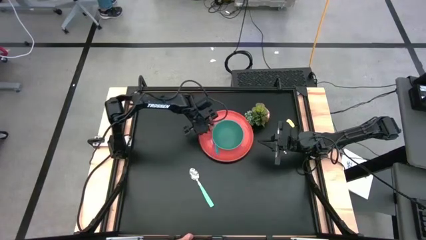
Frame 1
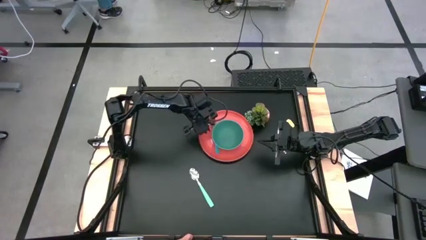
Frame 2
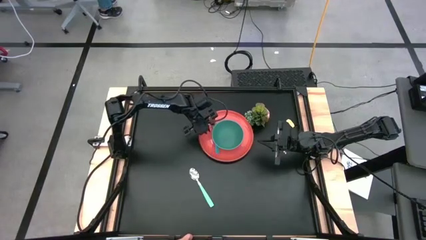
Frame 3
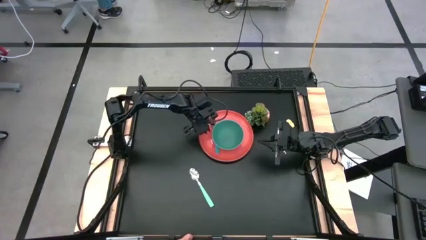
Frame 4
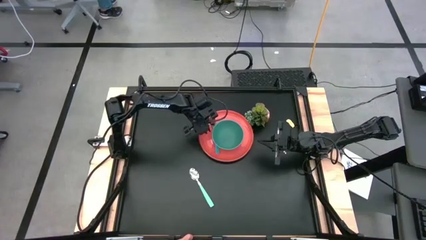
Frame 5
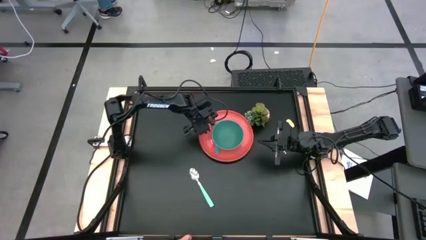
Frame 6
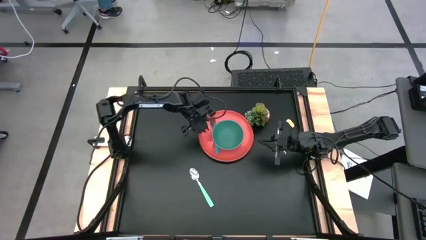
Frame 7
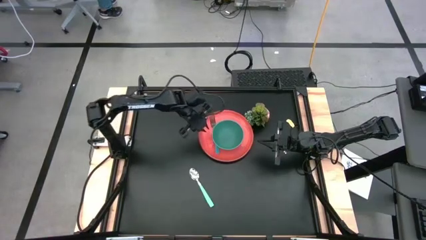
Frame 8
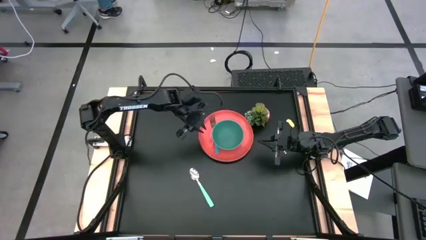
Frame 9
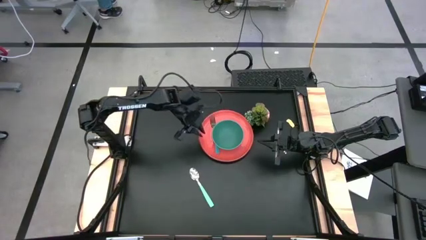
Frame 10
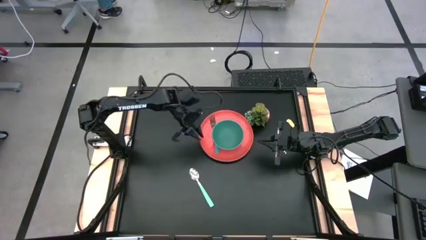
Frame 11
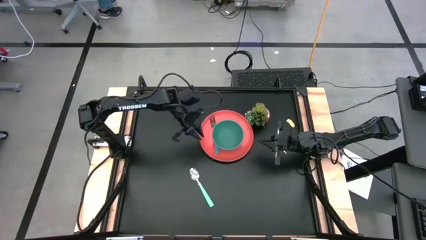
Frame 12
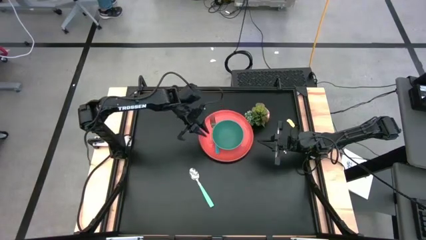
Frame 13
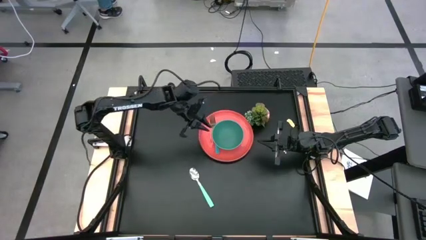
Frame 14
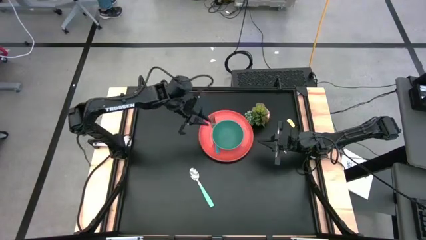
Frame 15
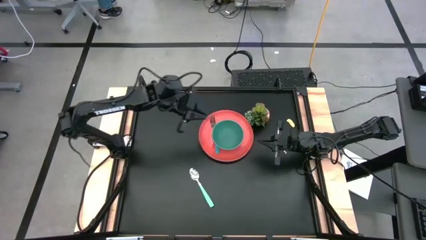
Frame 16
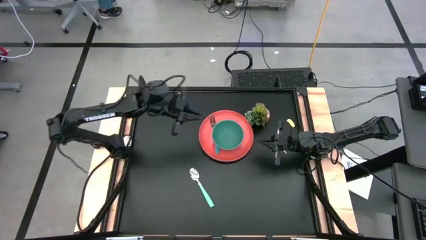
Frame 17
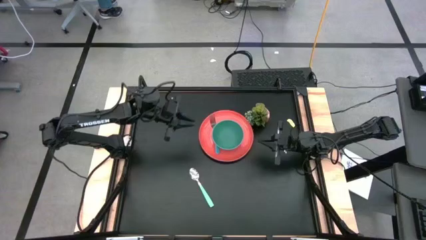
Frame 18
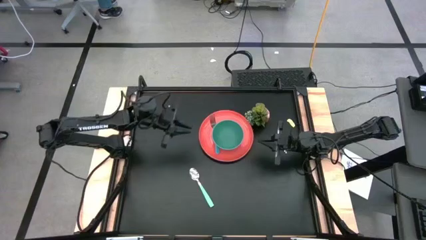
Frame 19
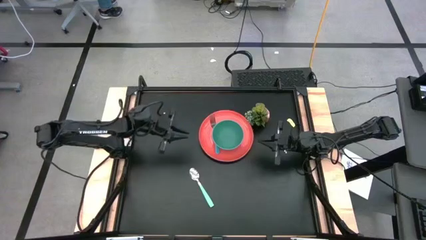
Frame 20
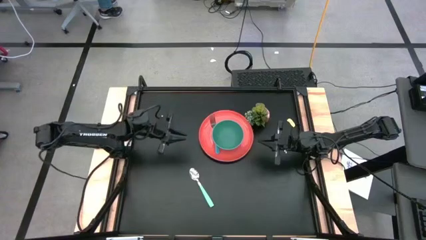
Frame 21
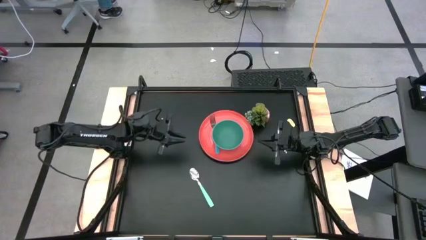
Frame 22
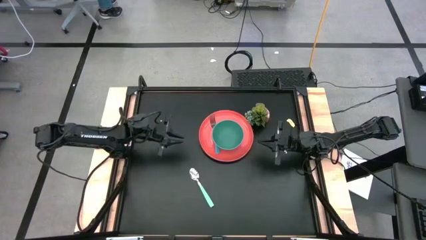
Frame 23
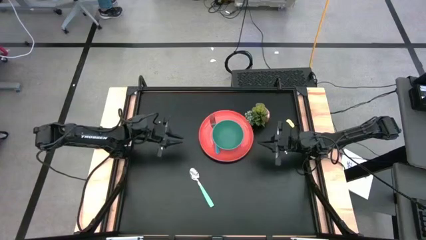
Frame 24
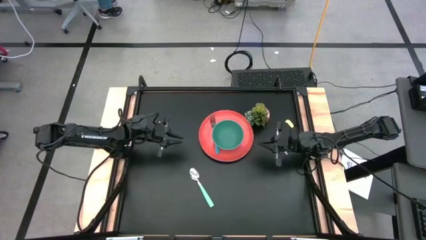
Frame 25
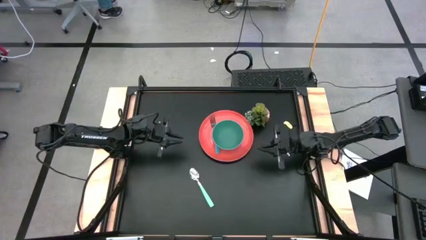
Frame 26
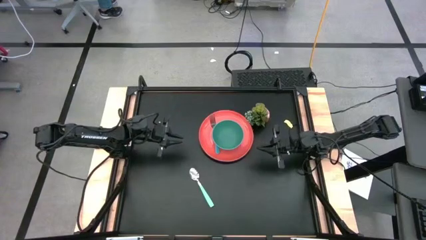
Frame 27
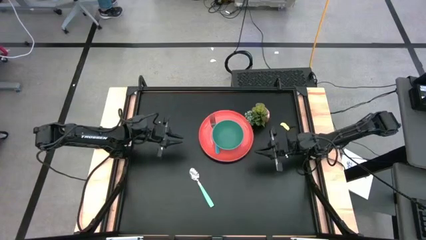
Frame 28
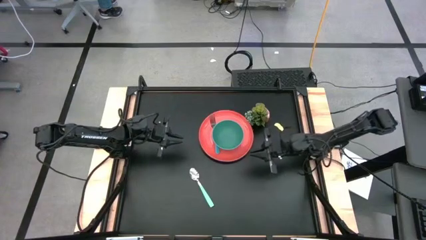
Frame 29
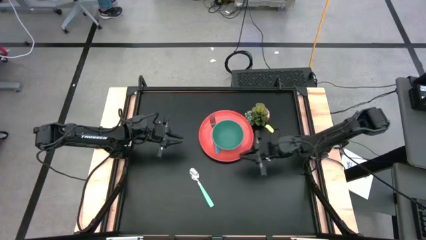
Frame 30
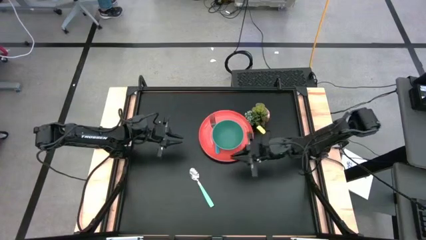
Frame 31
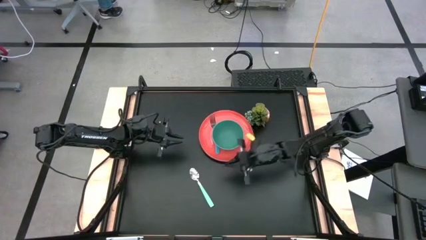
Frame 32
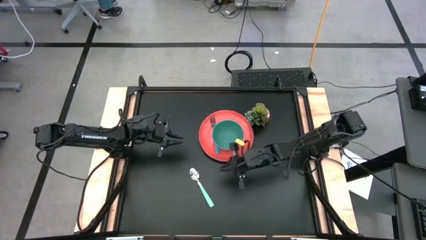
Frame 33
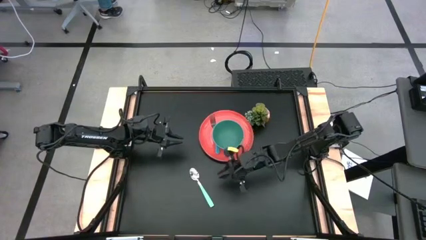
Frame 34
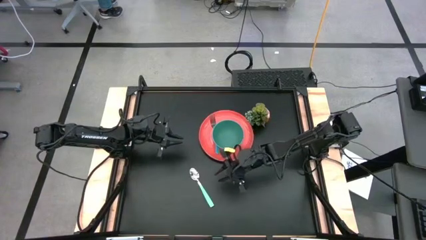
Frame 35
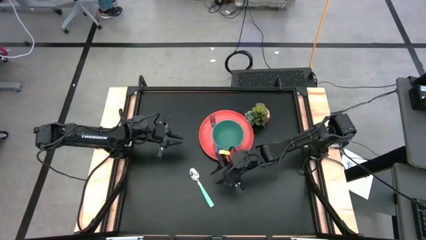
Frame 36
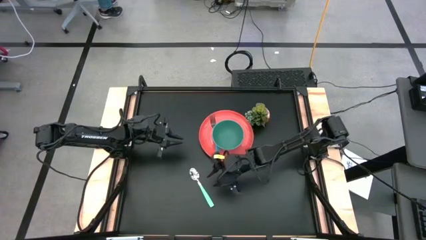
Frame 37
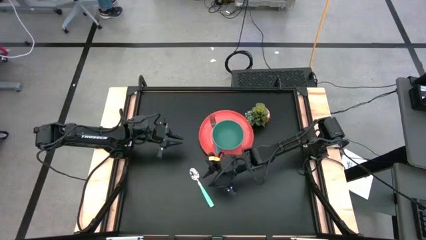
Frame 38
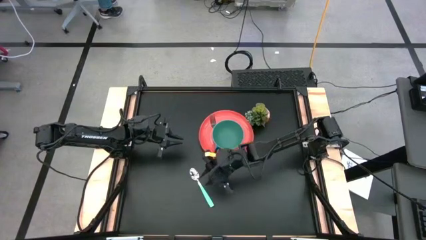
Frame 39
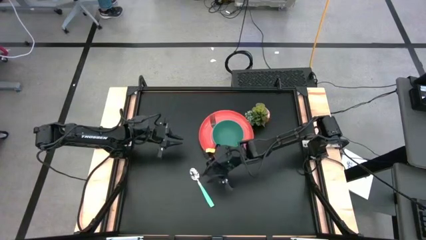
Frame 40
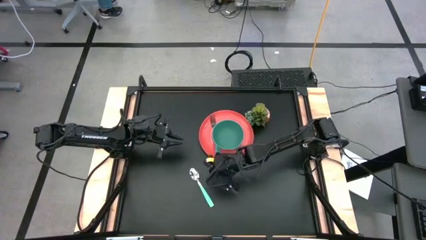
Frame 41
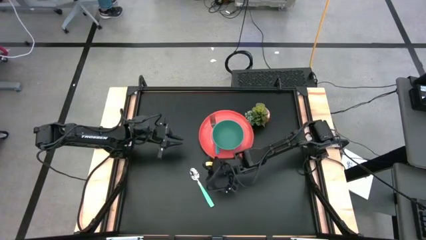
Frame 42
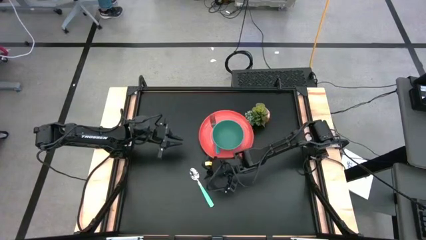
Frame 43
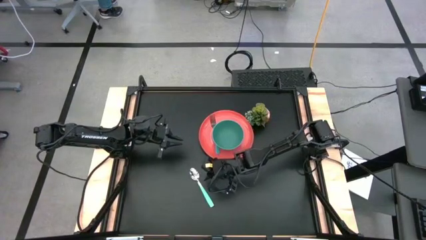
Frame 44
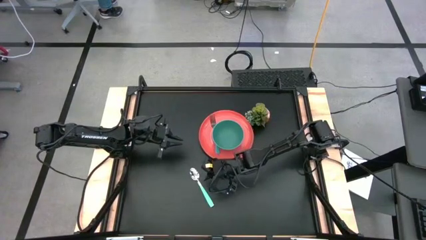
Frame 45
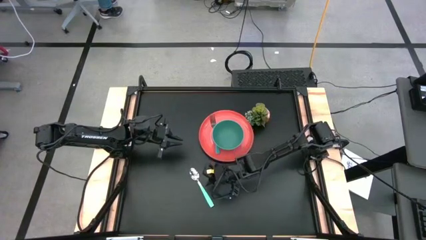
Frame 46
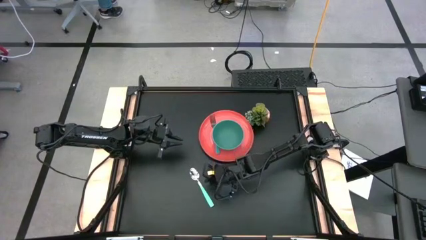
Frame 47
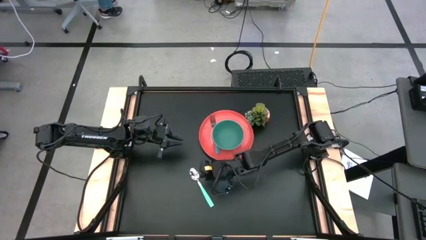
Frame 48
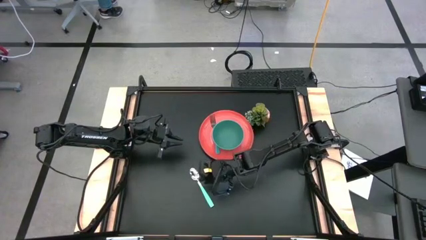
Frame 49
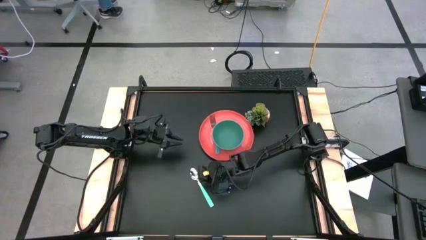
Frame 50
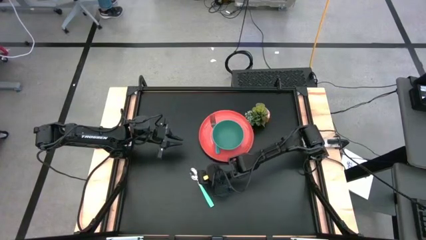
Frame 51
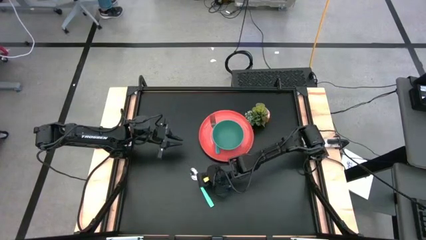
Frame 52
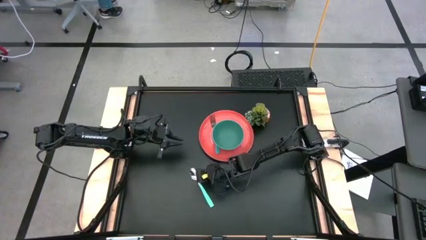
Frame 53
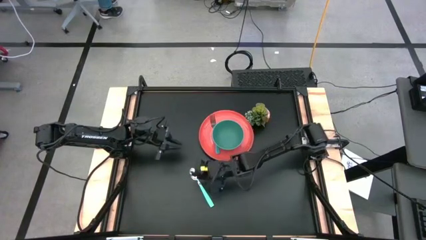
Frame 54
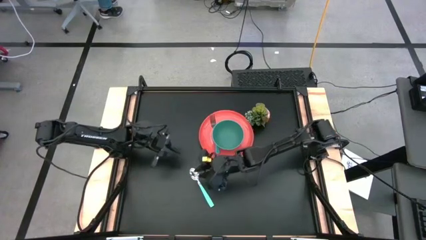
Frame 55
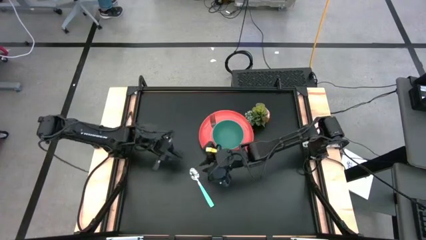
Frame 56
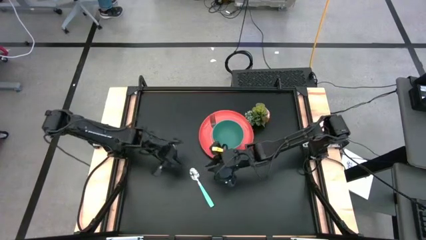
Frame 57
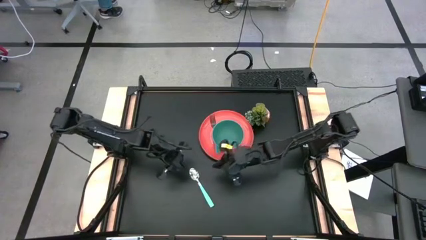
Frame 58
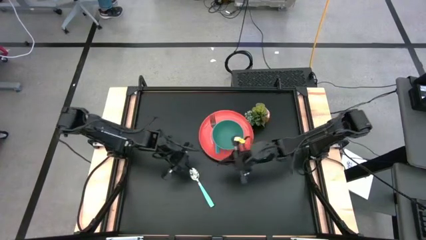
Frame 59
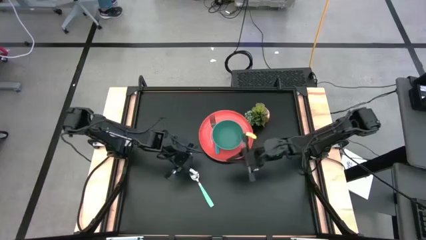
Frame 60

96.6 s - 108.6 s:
Task: Set table place
Put the blue spoon into the green bowl

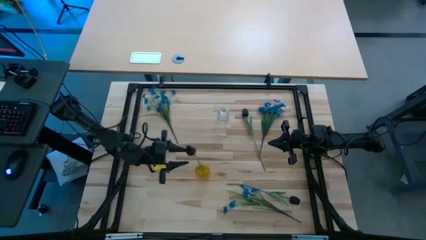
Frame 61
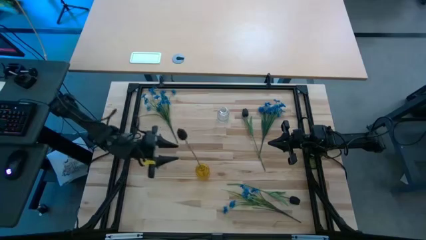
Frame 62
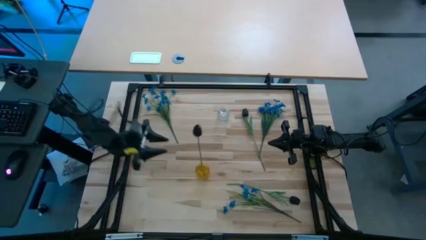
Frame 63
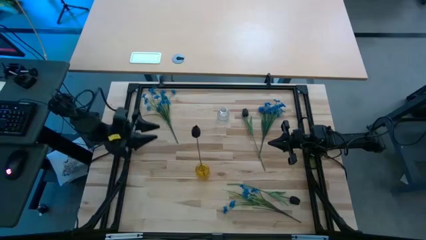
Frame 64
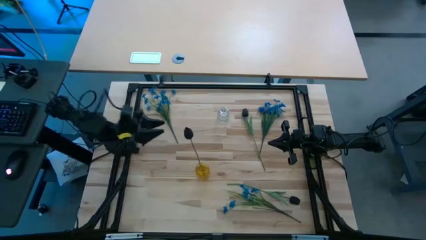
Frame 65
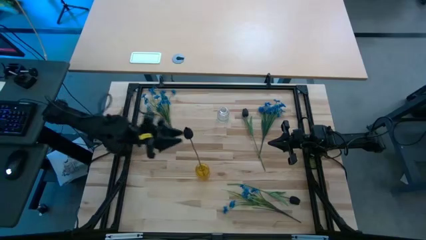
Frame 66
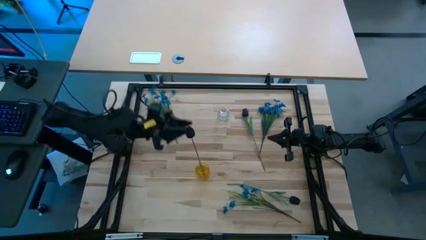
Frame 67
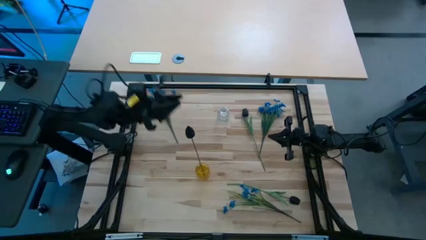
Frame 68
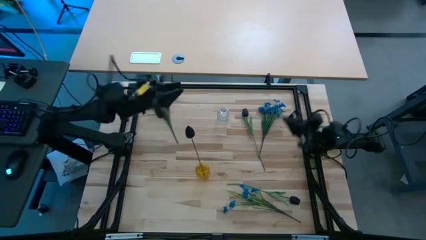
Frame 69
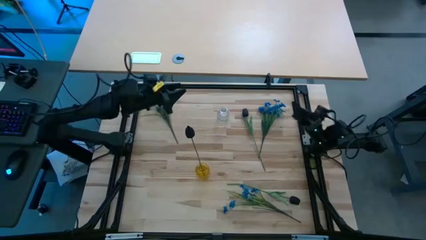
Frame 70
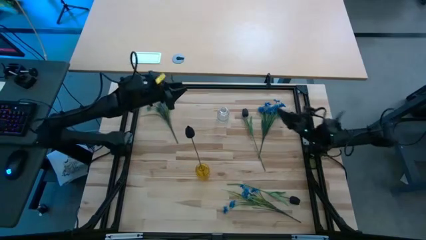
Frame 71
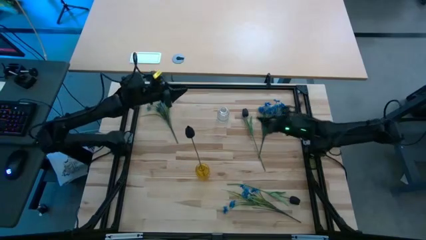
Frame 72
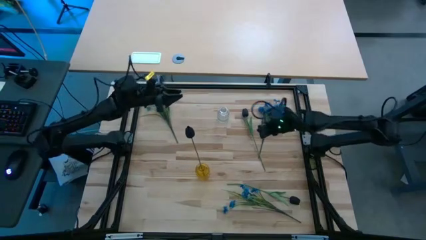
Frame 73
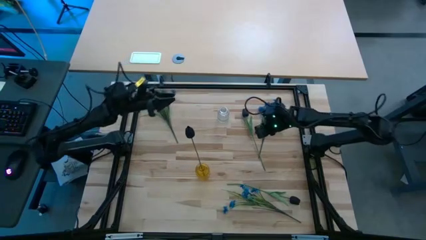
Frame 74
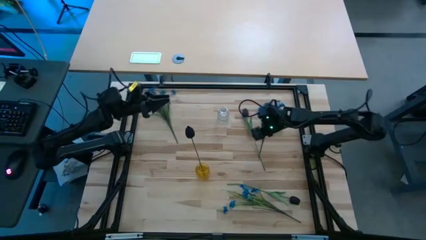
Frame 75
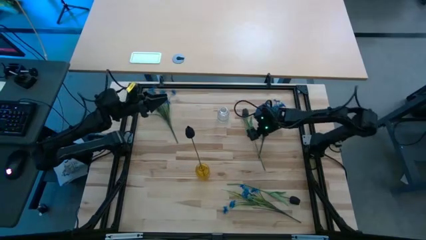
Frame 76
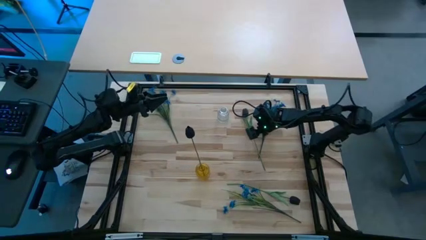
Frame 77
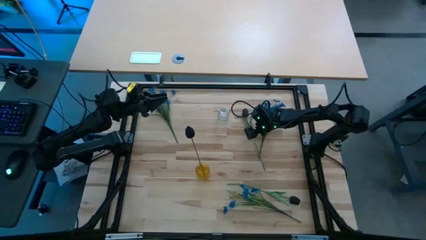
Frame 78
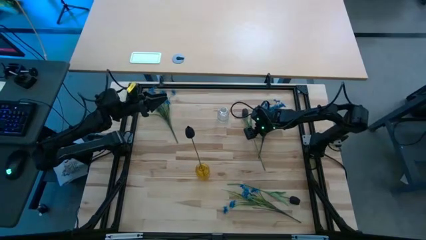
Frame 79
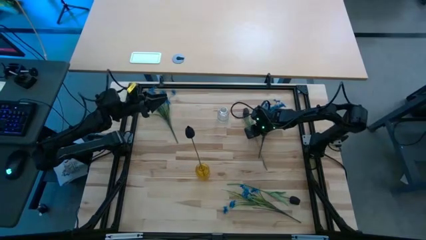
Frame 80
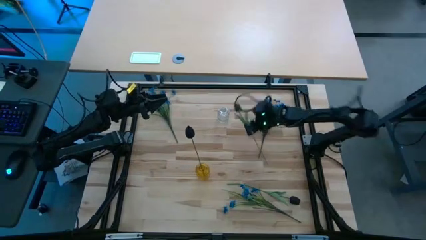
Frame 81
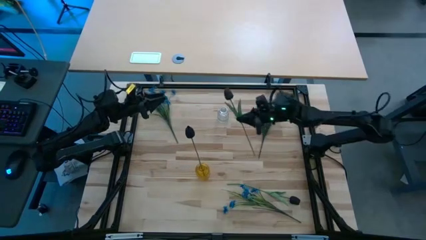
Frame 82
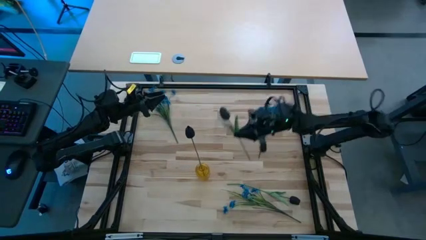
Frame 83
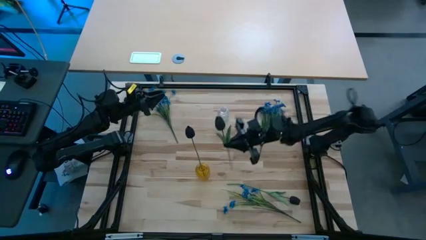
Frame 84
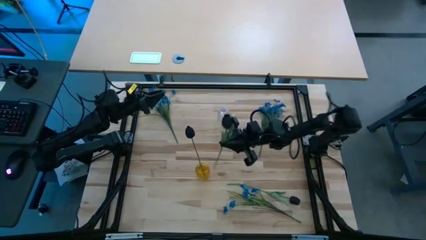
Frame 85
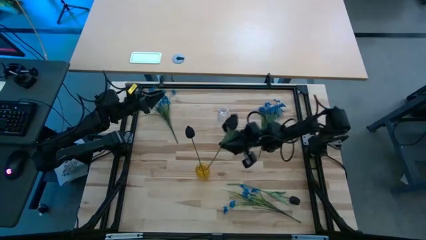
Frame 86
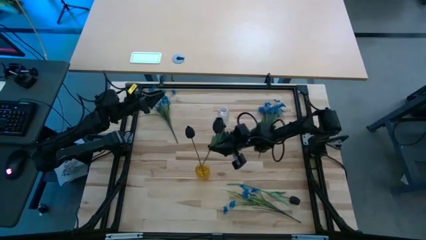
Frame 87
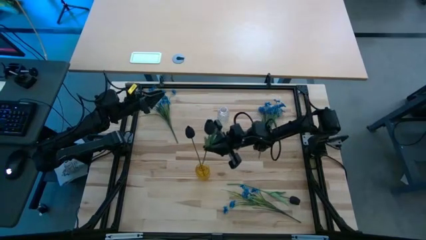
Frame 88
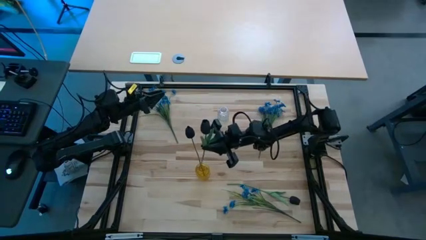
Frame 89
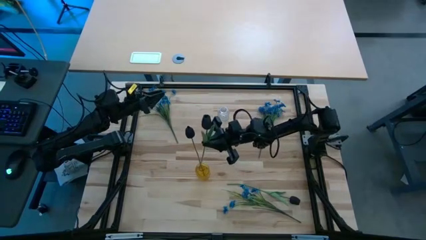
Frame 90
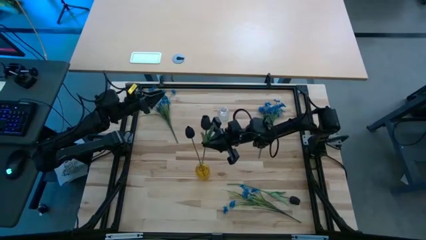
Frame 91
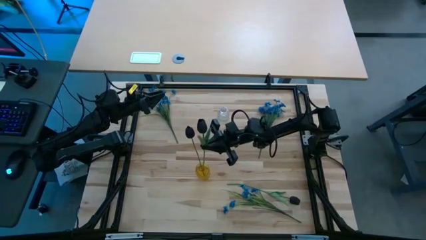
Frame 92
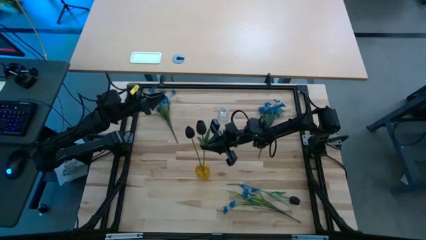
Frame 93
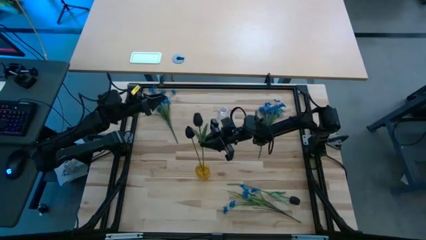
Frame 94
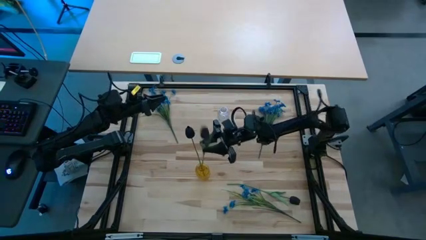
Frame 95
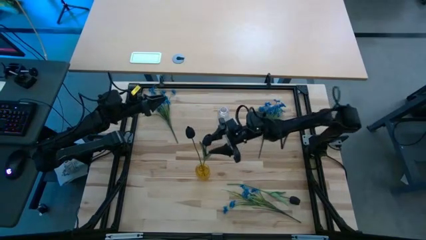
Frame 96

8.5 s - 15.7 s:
Task: Sort flowers into vase by color
Put the top black flower into the yellow vase
